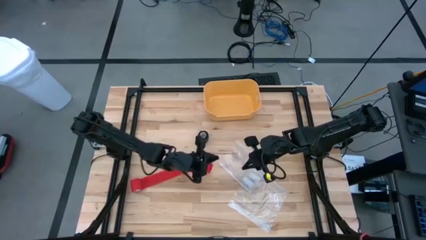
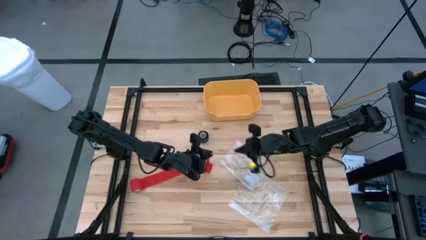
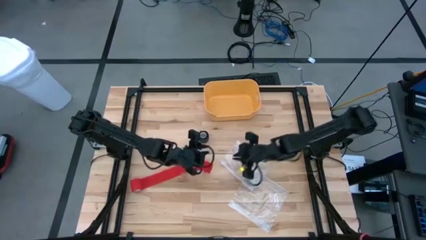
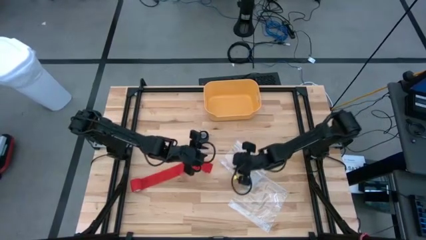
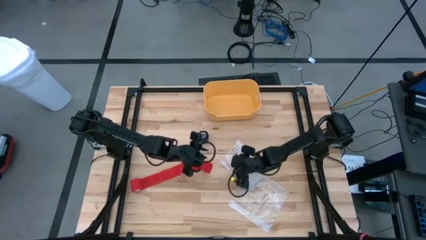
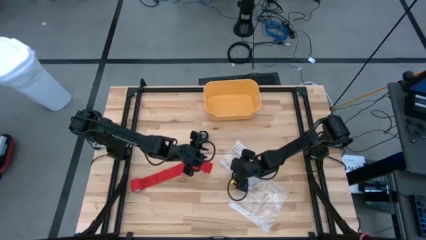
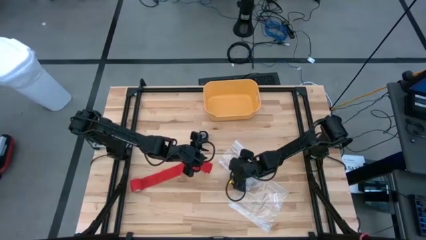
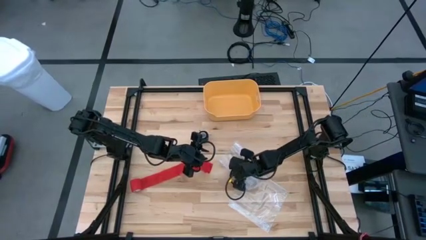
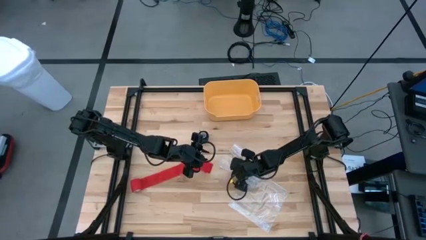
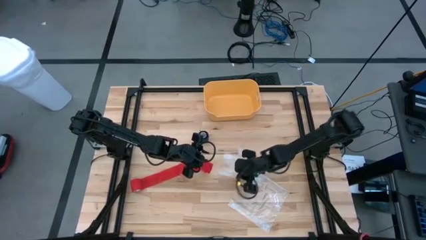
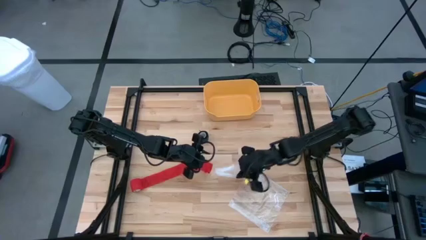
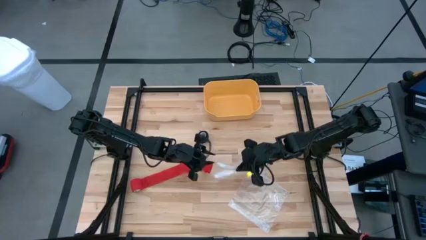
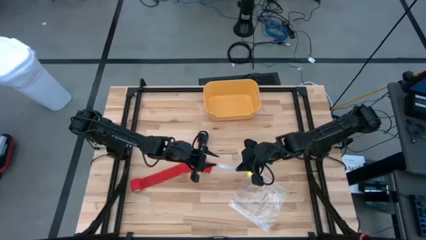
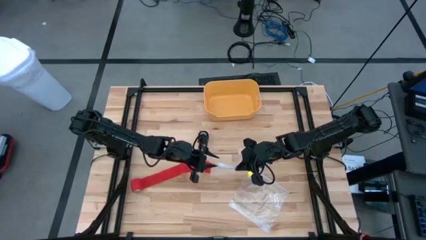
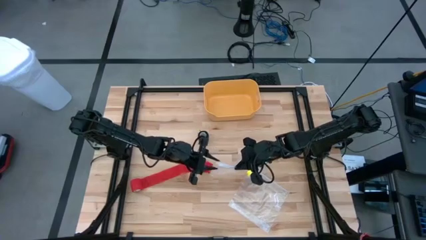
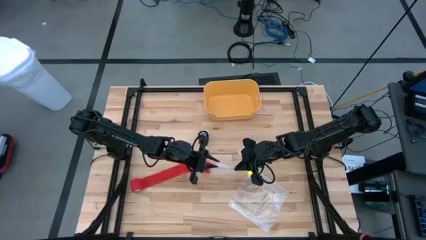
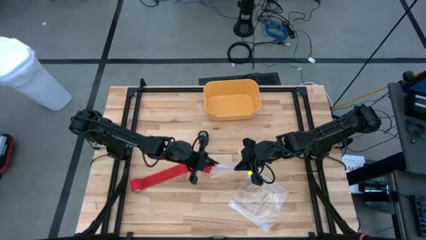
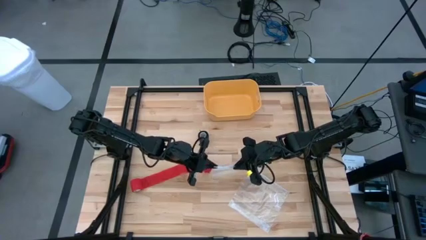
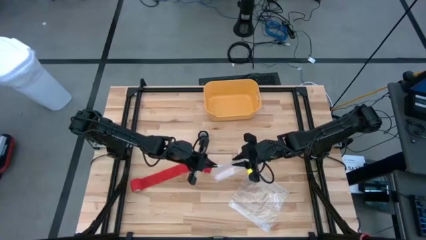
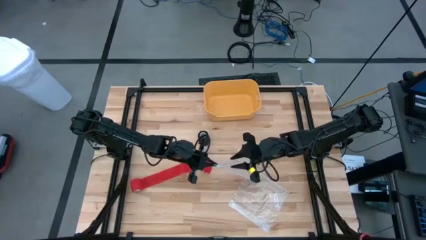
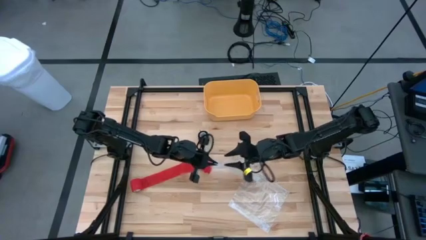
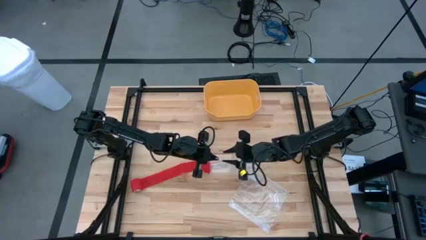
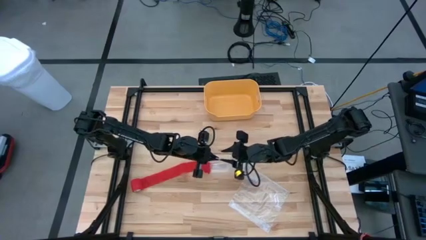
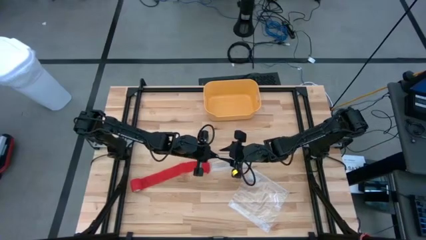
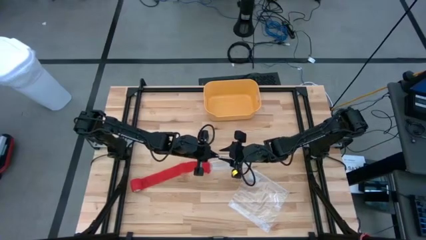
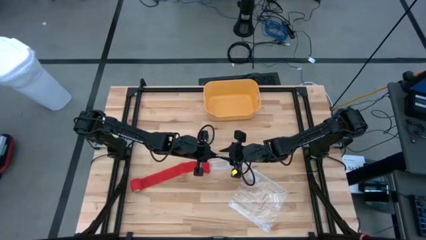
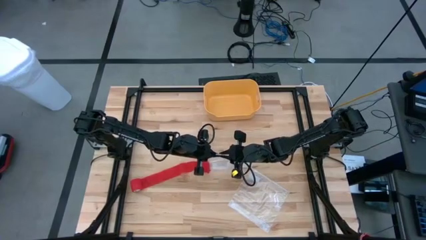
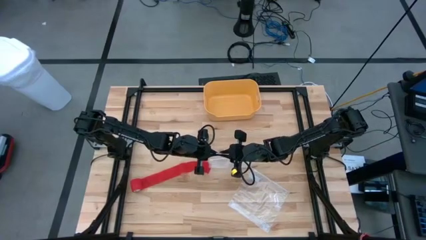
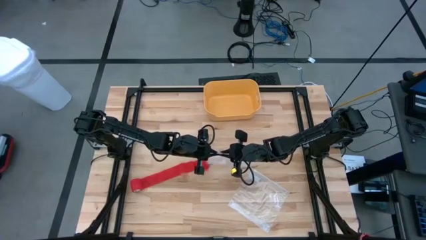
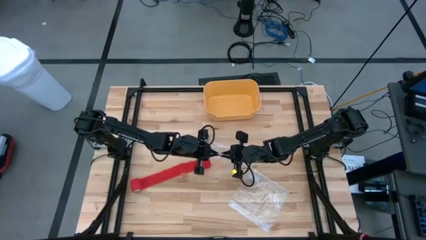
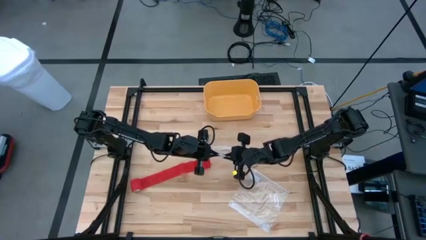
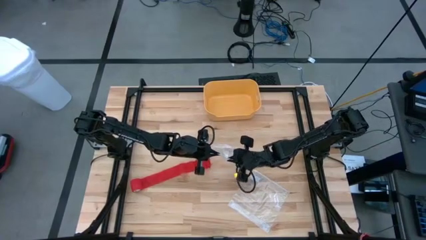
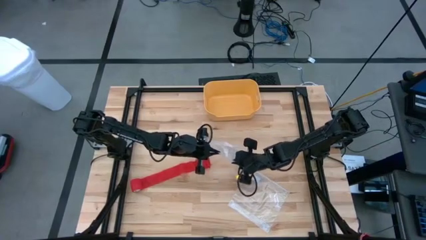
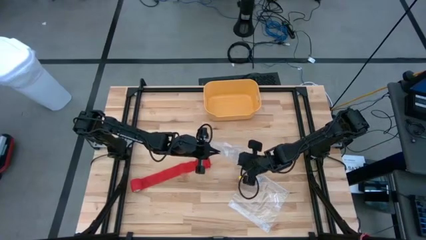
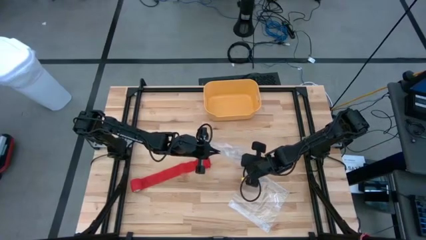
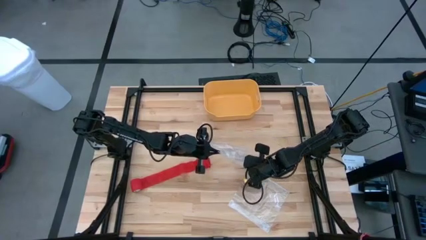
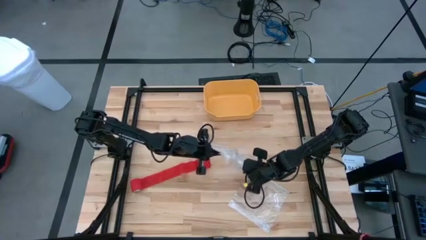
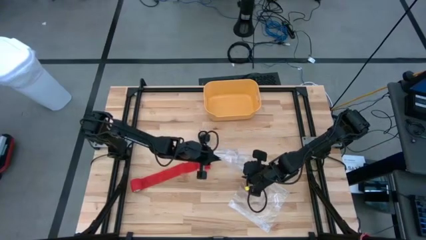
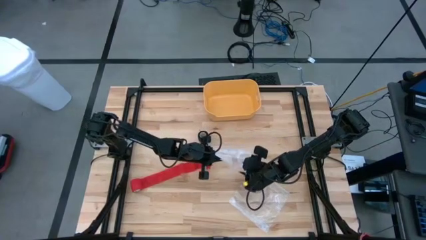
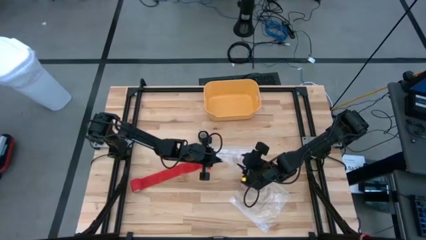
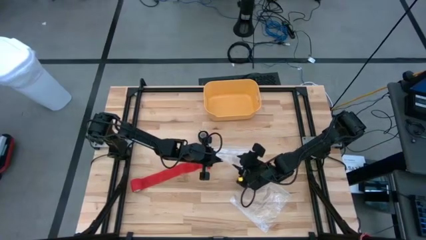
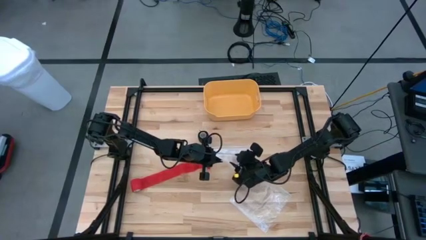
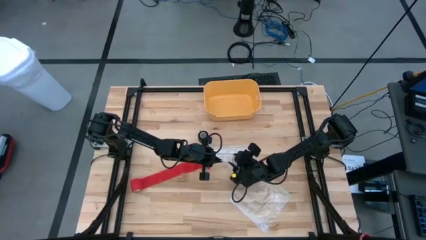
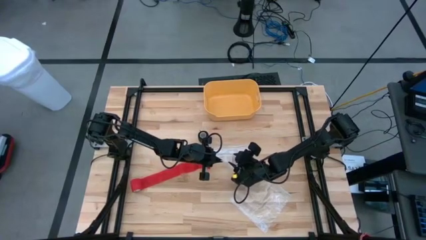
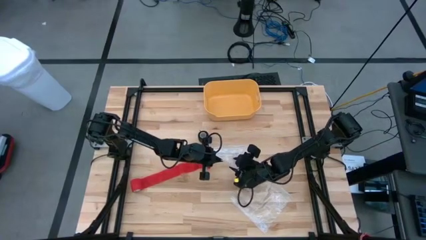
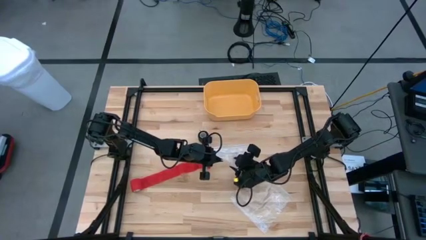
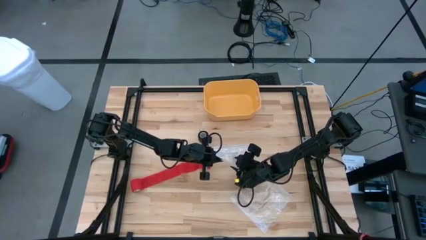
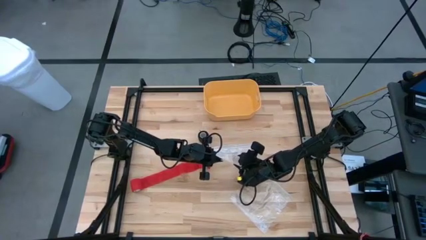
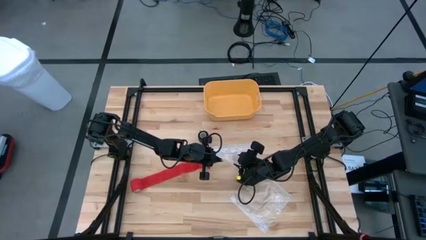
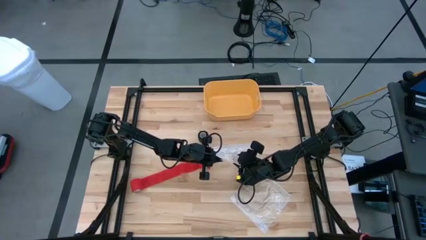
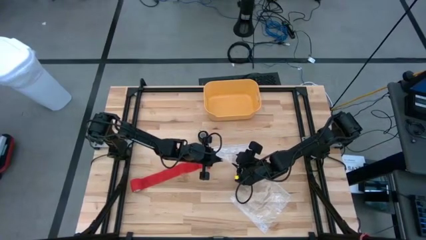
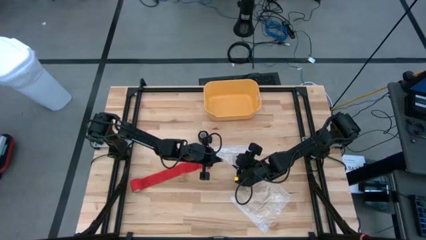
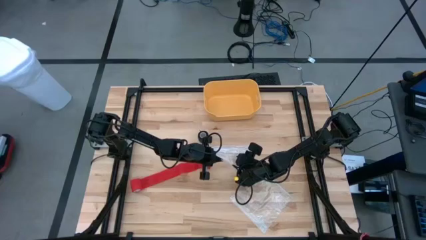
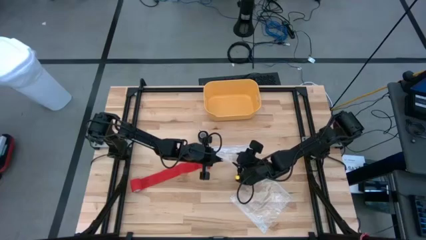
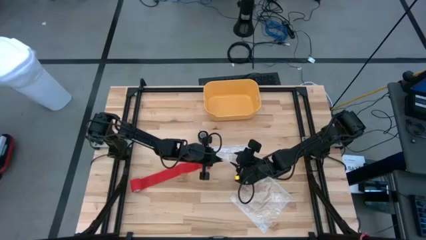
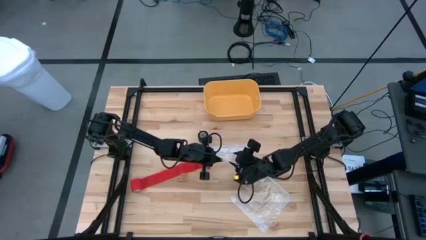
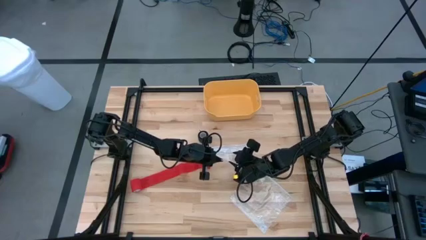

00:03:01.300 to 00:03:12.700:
Task: Roll bandage
Open the transparent zip bag
